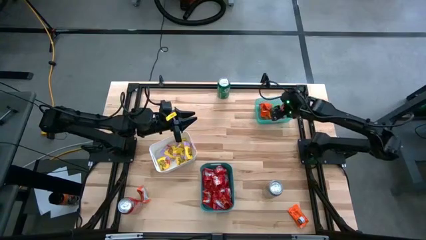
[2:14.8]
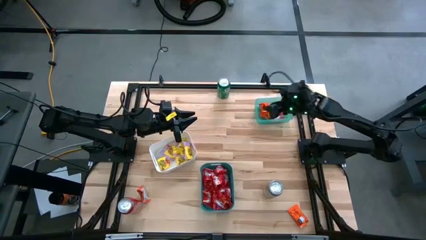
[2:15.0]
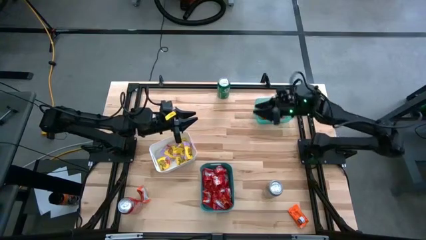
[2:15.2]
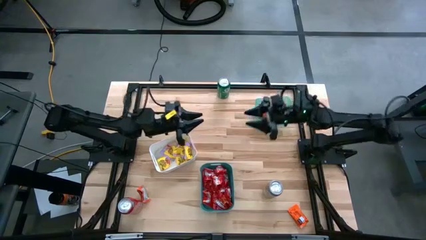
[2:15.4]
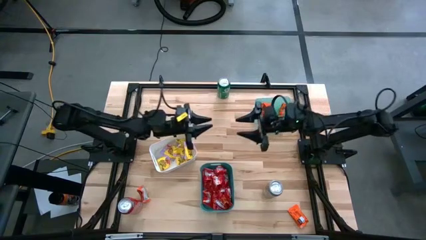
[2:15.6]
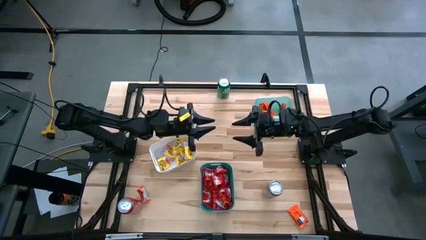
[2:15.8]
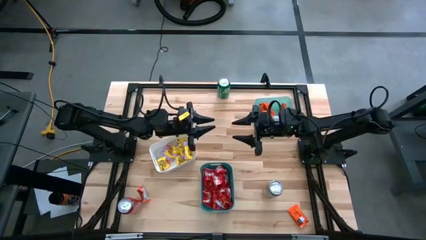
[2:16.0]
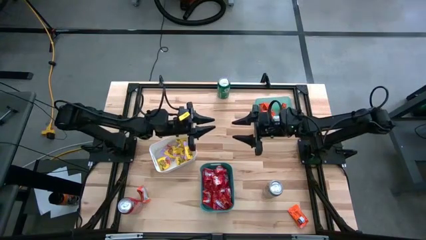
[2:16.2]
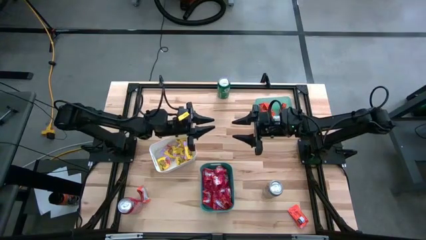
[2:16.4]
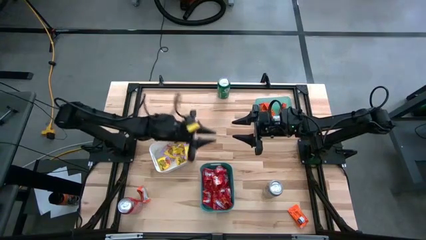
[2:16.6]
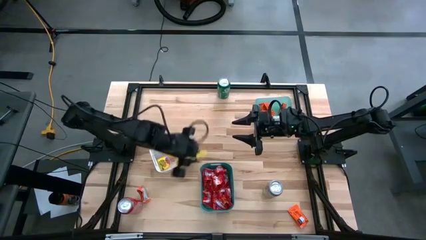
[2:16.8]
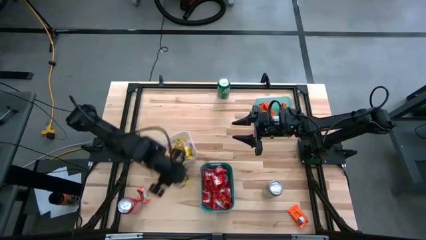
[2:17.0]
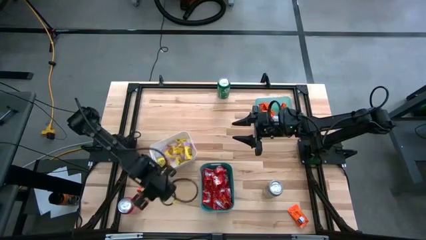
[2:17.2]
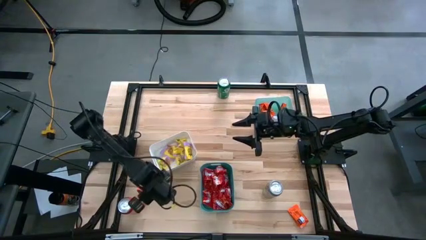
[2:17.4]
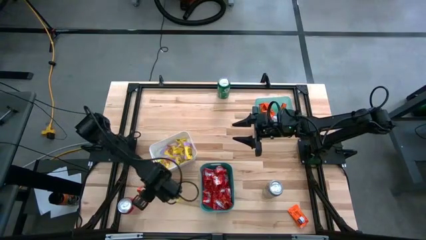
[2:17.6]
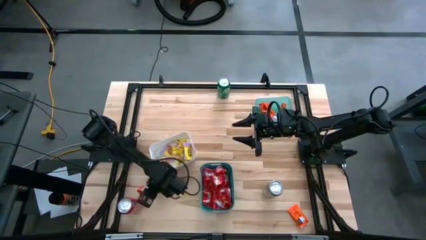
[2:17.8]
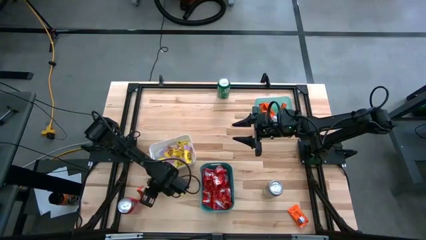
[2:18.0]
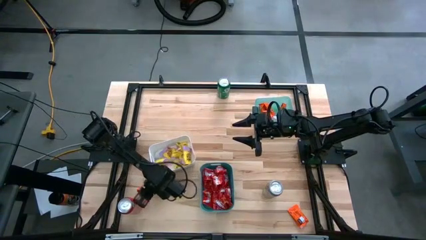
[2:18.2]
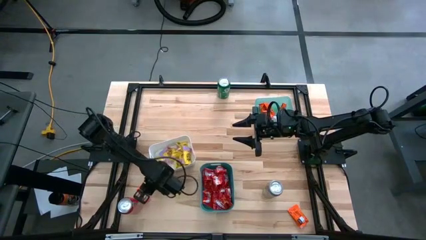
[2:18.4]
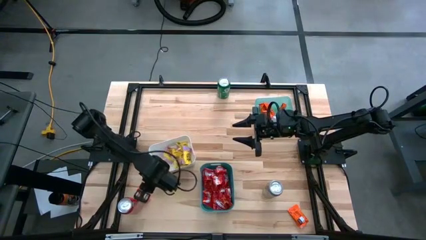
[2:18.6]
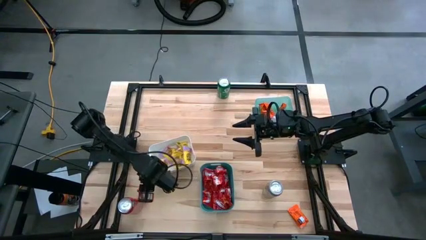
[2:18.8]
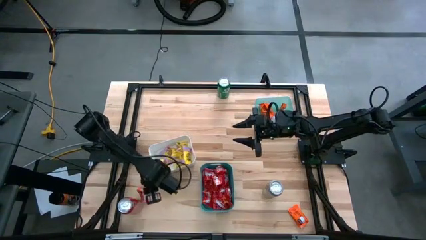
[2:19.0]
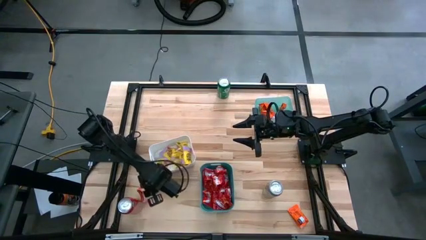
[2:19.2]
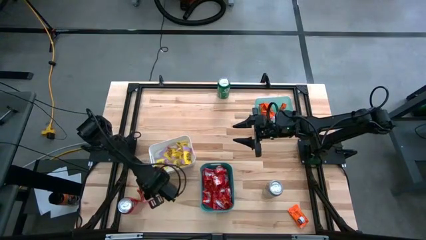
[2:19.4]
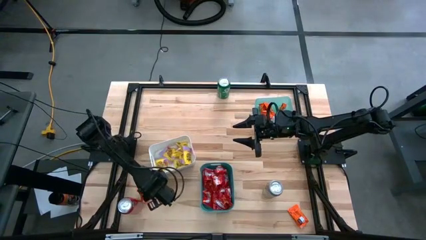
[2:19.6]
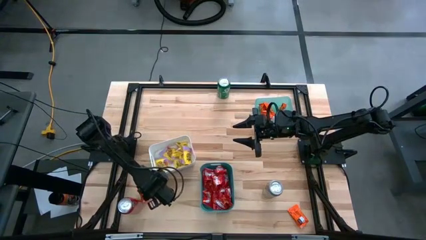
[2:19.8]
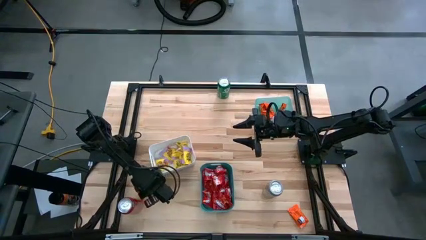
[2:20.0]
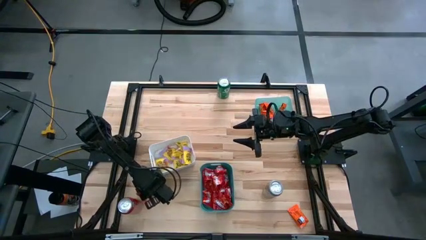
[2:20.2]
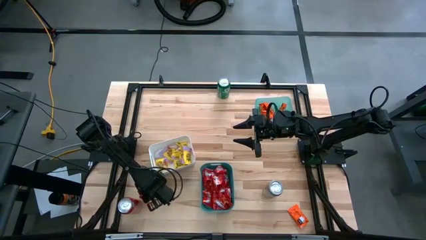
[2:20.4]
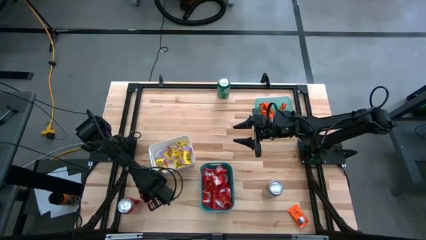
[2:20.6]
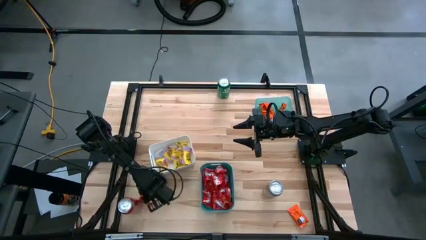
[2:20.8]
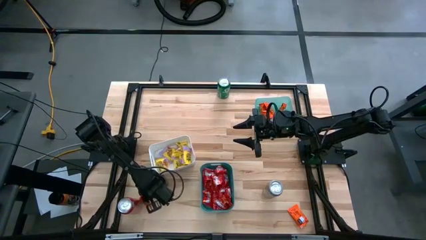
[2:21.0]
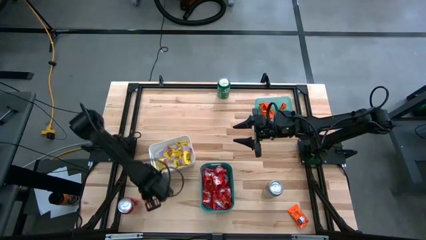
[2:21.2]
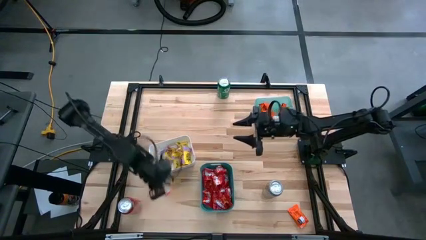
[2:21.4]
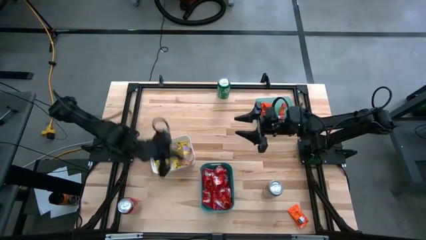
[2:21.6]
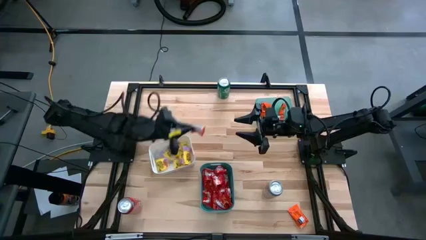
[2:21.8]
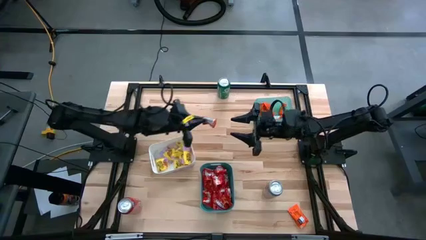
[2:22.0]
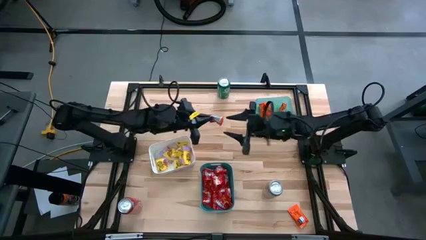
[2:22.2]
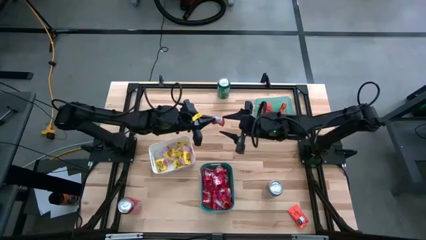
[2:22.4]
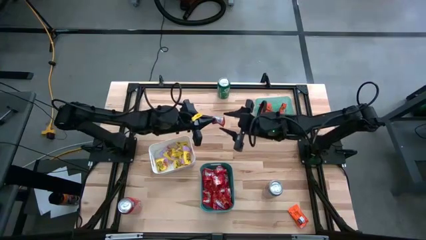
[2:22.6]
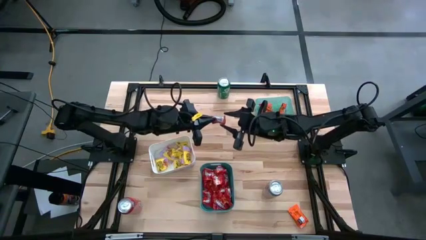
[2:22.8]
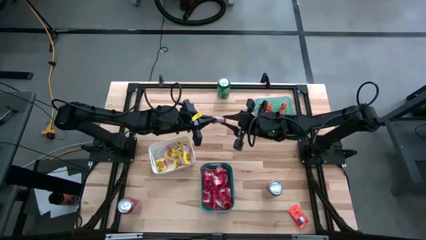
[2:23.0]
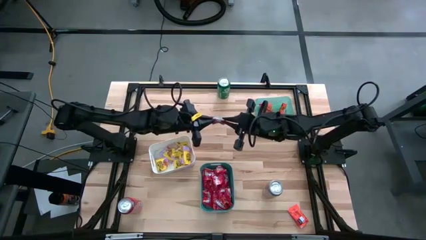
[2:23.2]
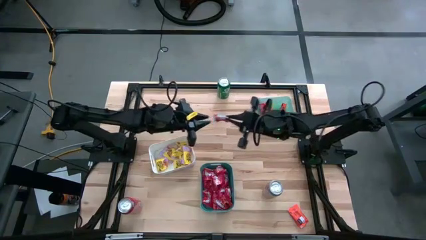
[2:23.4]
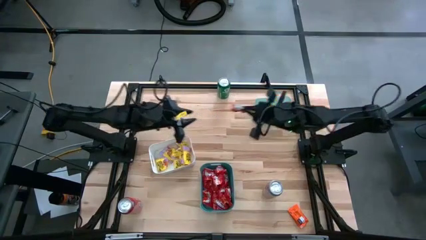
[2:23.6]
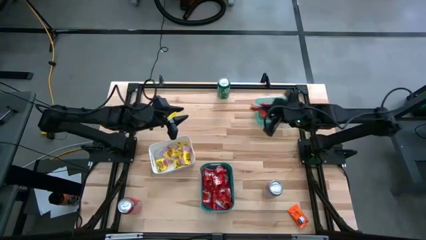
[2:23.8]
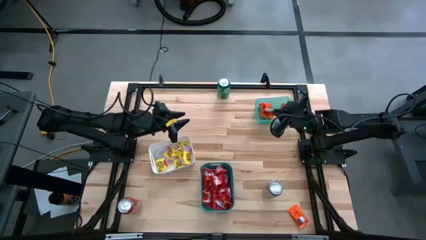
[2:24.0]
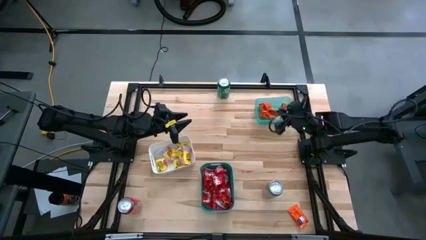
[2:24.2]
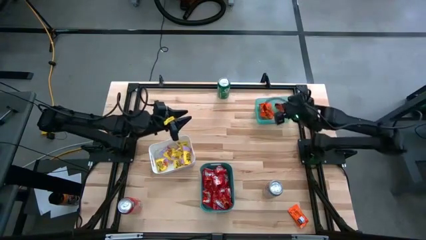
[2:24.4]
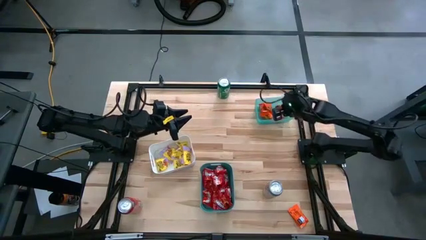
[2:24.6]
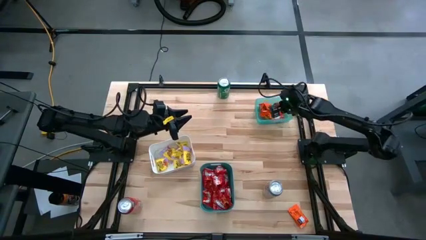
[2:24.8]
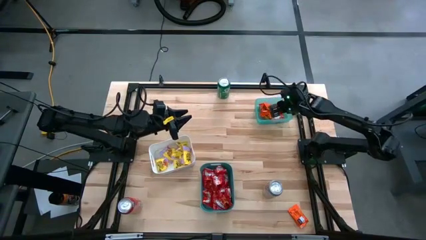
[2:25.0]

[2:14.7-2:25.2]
Task: Sort candy
Put the orange chocolate into the transparent green bin

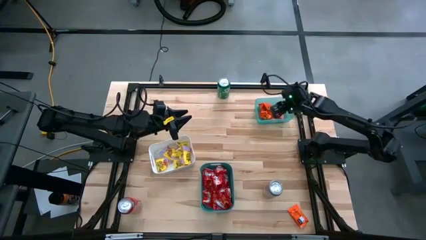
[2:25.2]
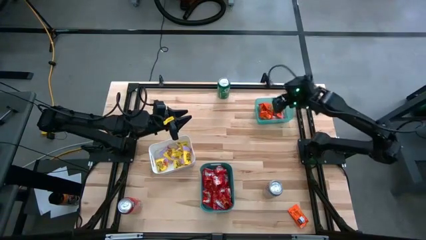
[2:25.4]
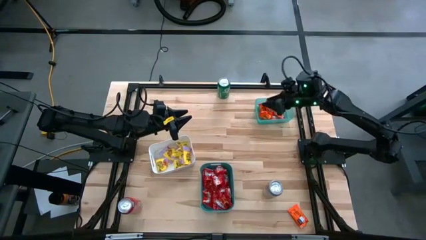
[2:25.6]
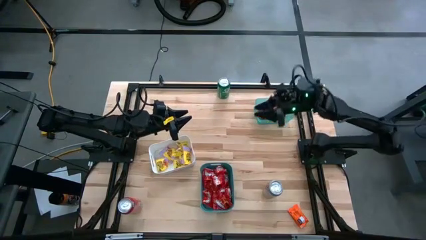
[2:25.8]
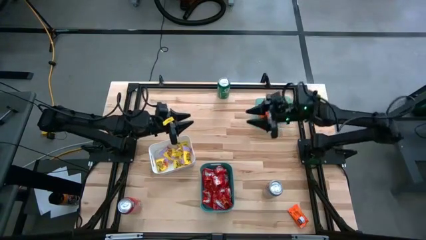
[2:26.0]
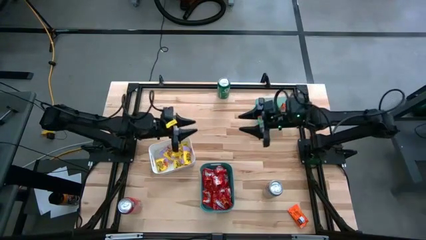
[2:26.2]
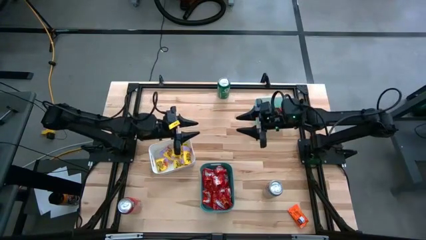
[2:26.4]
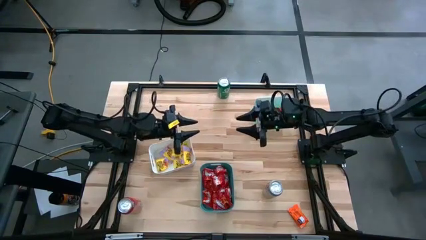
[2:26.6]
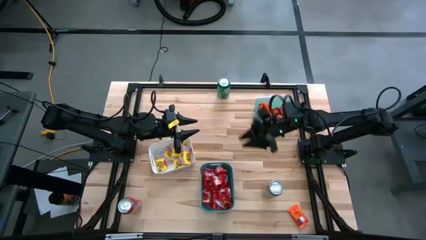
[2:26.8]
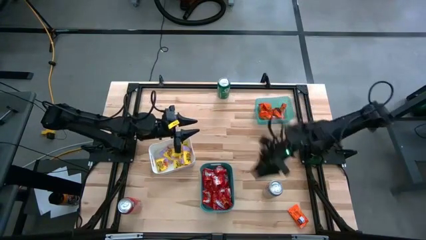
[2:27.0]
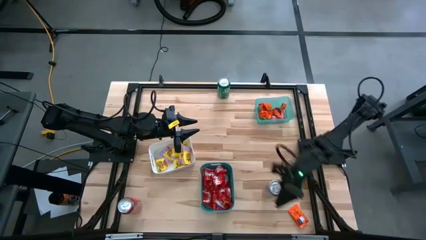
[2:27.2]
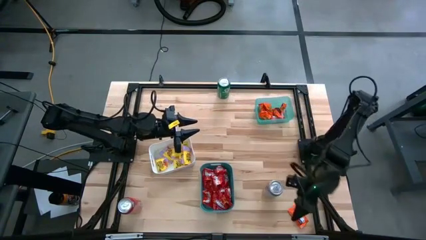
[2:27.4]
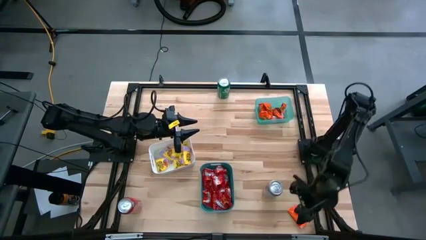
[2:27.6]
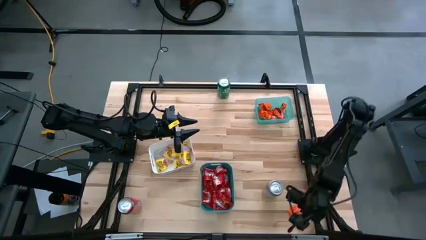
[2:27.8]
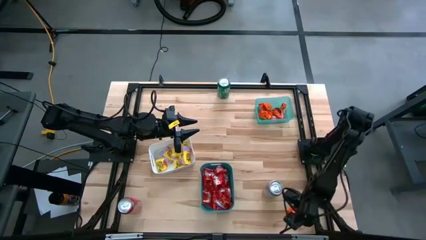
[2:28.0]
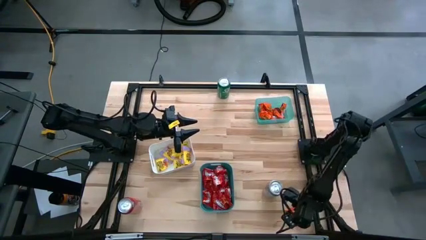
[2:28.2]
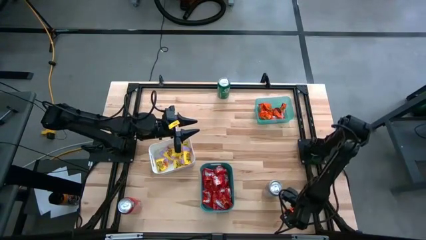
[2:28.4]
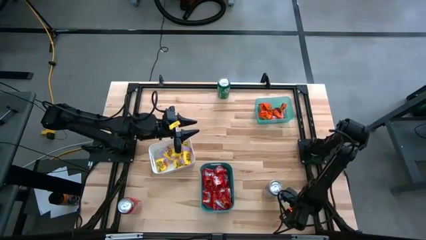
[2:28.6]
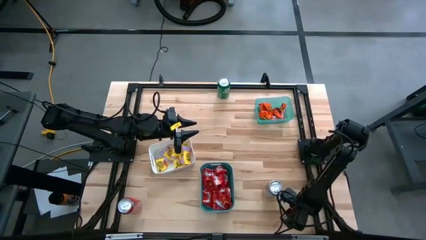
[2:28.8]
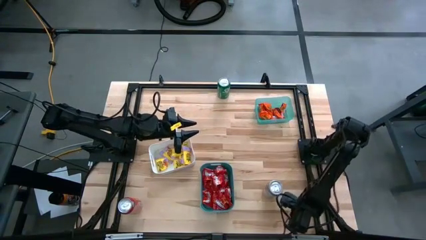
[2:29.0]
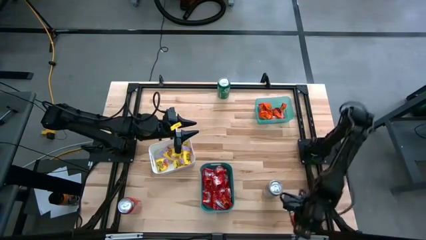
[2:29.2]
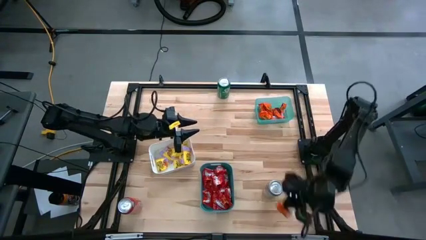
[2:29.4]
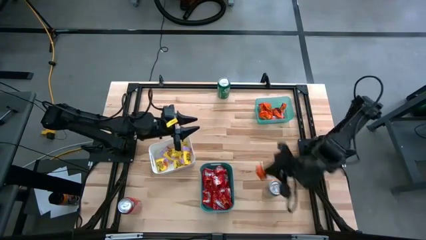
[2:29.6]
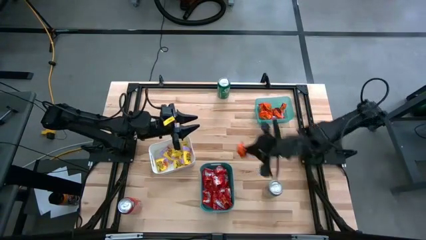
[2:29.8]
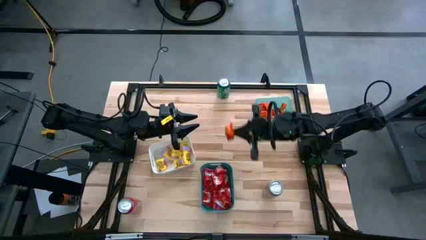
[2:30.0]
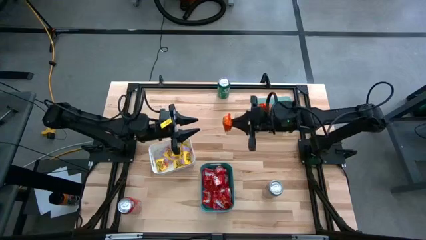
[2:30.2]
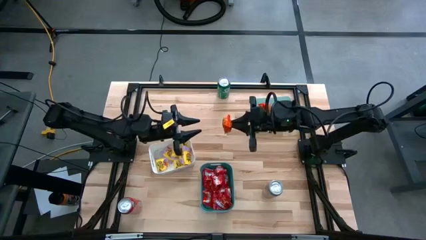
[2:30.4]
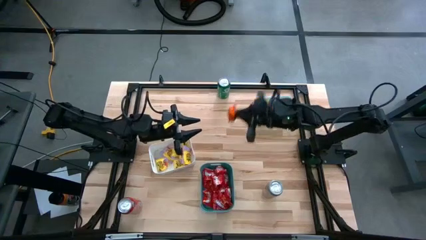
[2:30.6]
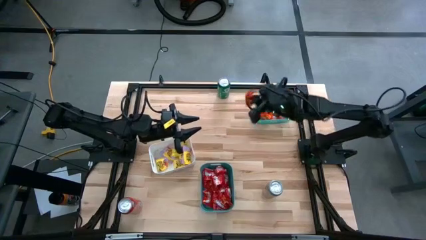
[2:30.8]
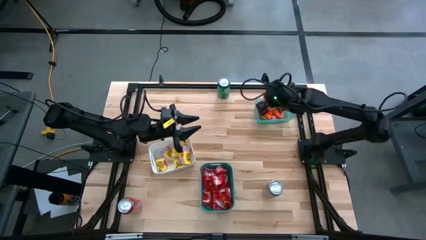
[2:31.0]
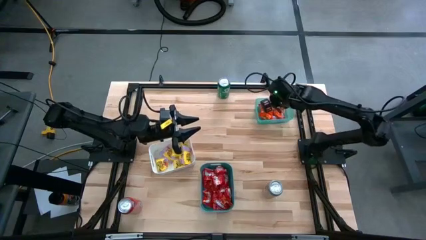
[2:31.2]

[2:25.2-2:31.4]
Put the orange chocolate into the transparent green bin
